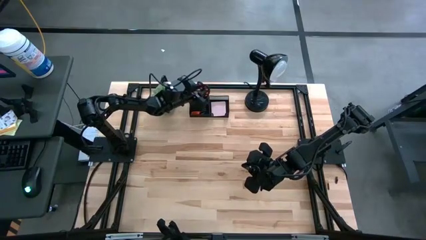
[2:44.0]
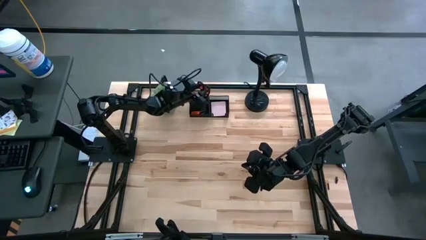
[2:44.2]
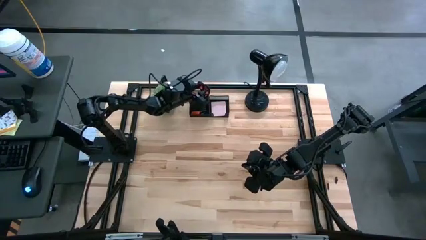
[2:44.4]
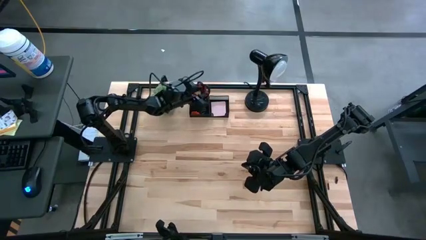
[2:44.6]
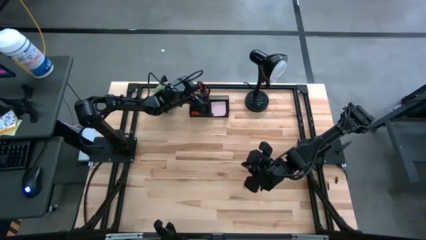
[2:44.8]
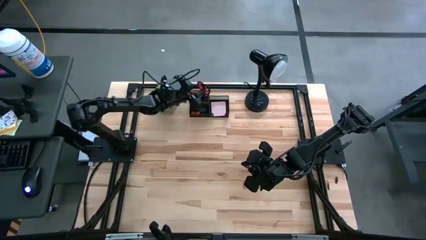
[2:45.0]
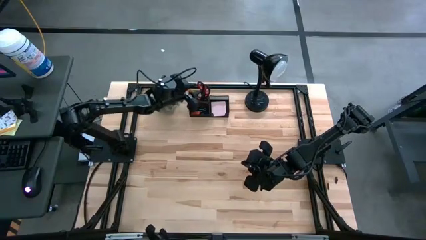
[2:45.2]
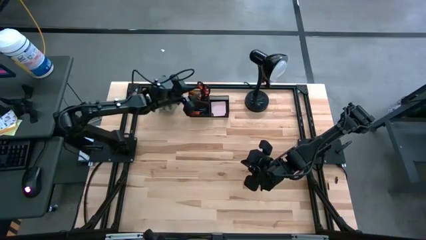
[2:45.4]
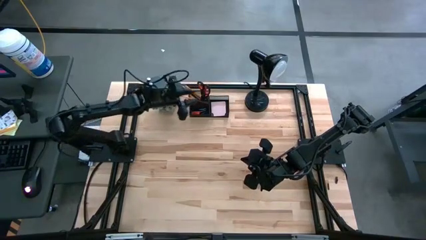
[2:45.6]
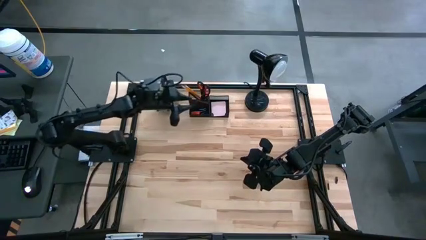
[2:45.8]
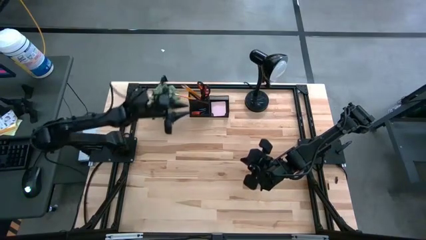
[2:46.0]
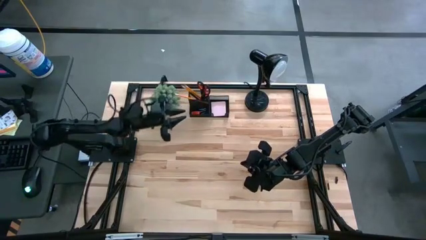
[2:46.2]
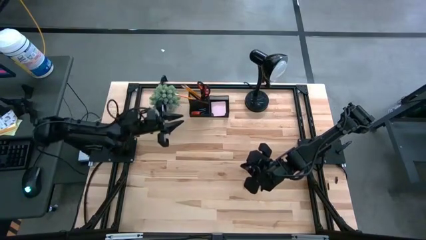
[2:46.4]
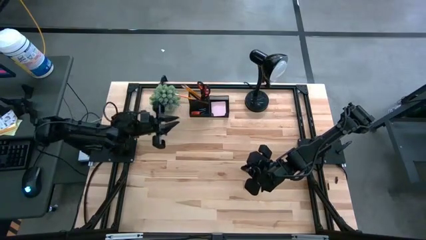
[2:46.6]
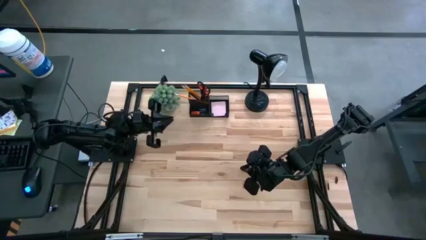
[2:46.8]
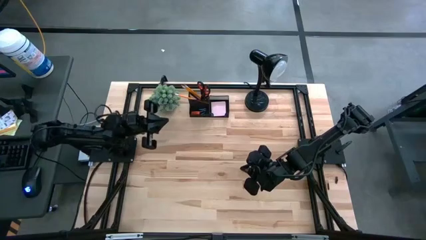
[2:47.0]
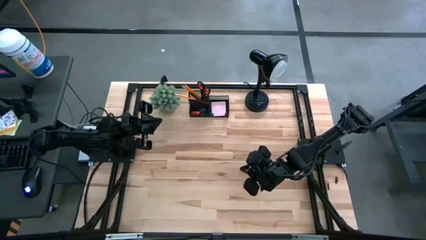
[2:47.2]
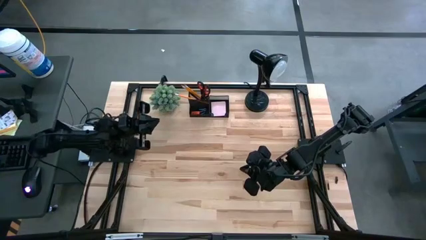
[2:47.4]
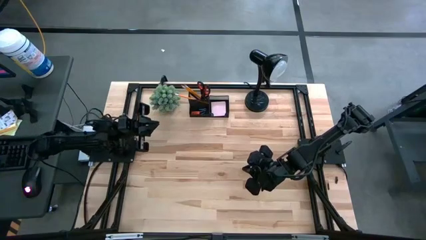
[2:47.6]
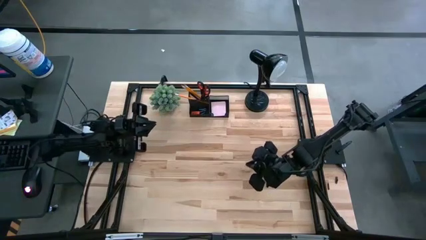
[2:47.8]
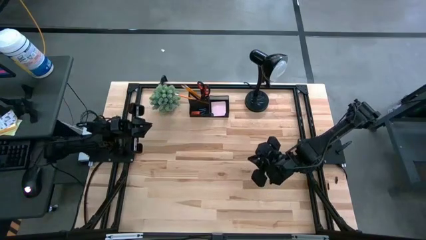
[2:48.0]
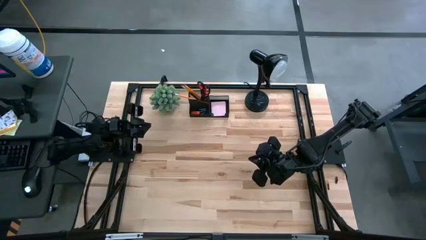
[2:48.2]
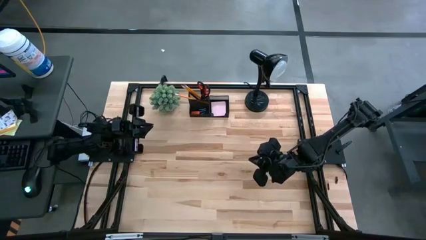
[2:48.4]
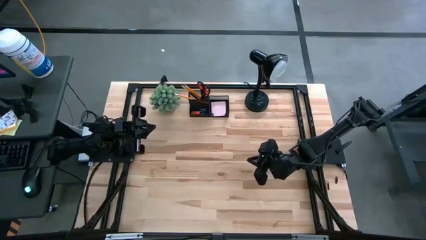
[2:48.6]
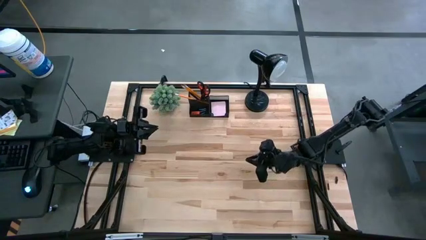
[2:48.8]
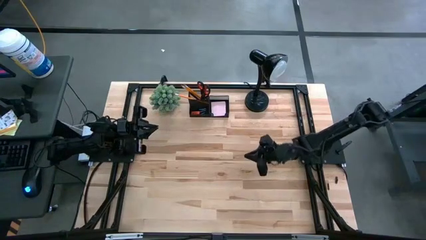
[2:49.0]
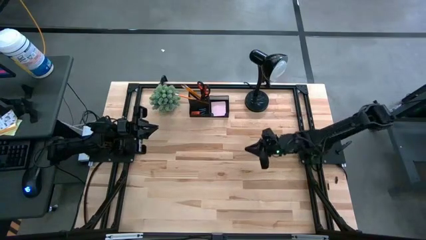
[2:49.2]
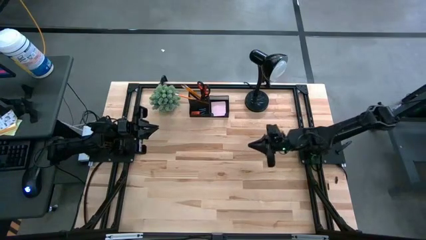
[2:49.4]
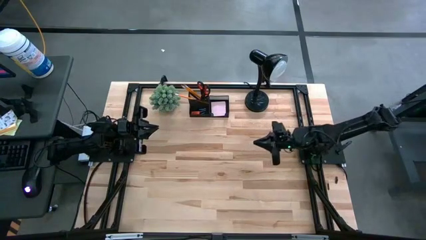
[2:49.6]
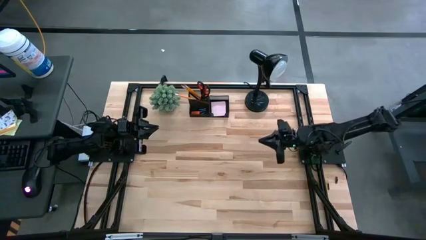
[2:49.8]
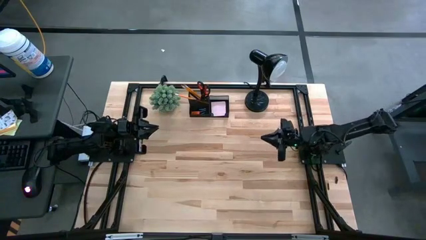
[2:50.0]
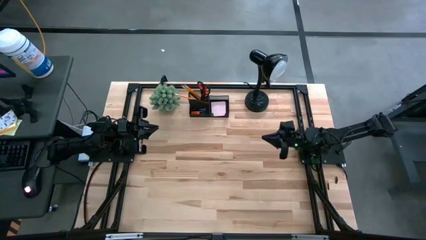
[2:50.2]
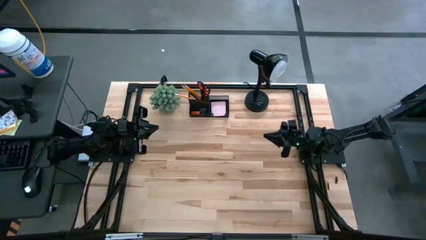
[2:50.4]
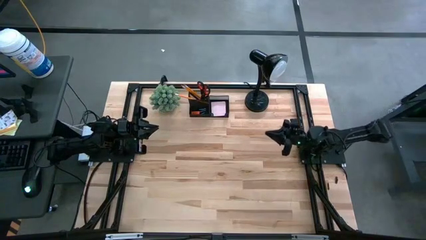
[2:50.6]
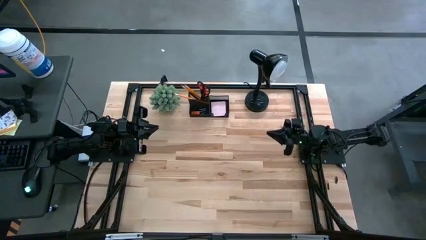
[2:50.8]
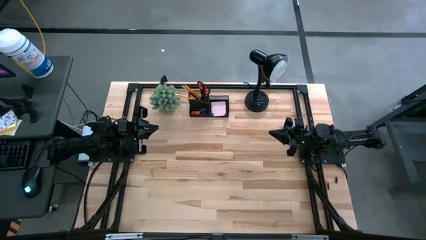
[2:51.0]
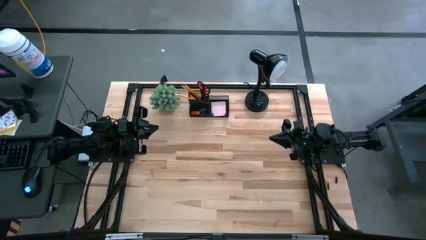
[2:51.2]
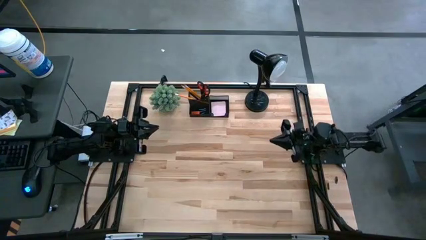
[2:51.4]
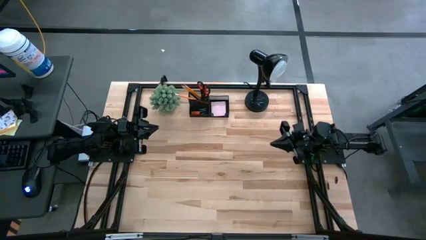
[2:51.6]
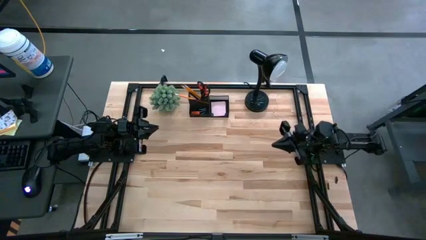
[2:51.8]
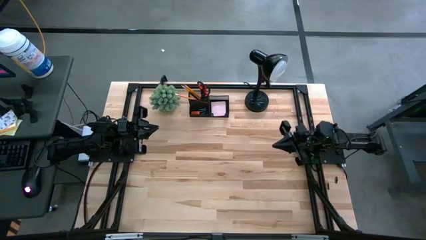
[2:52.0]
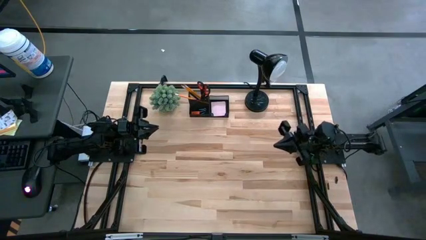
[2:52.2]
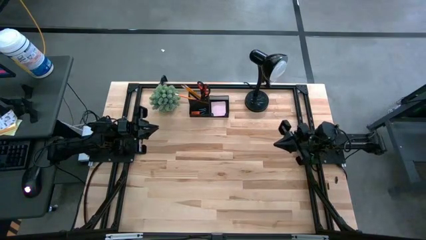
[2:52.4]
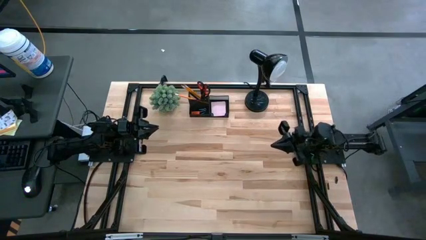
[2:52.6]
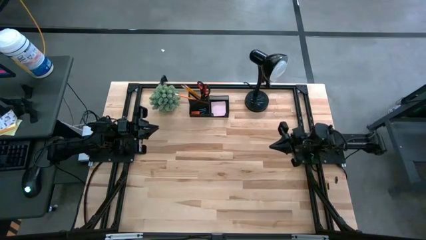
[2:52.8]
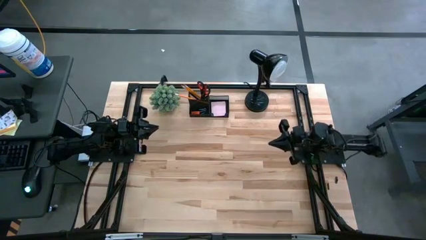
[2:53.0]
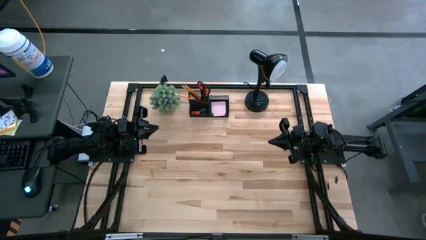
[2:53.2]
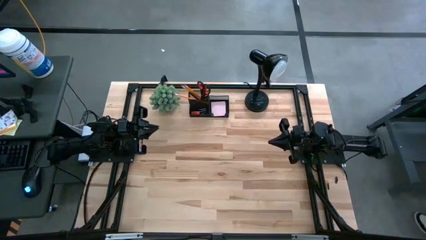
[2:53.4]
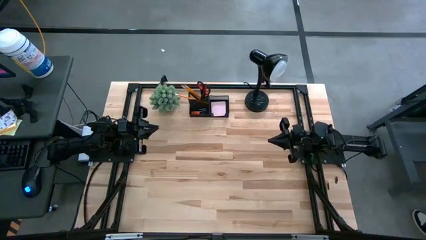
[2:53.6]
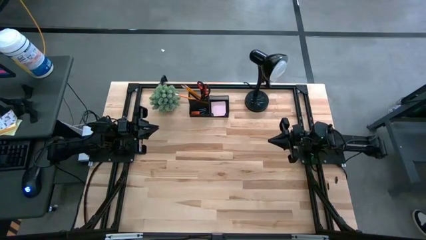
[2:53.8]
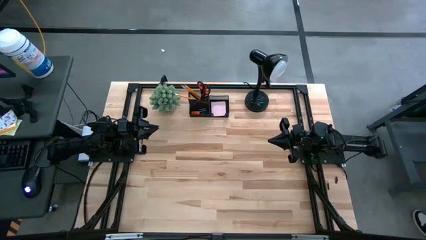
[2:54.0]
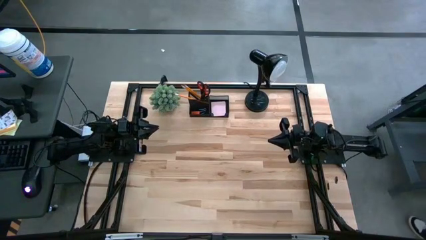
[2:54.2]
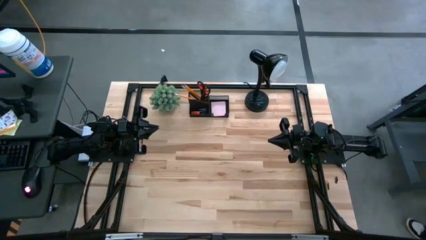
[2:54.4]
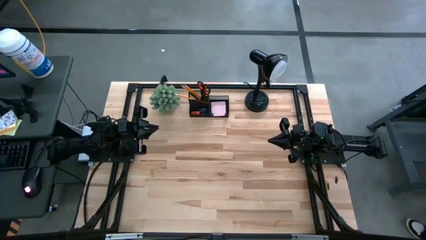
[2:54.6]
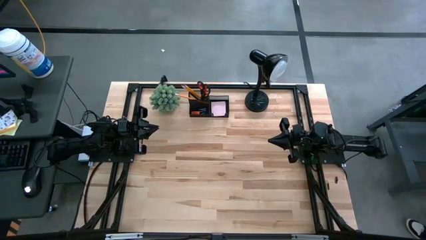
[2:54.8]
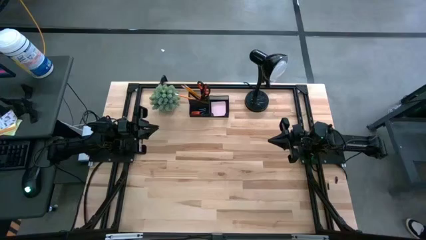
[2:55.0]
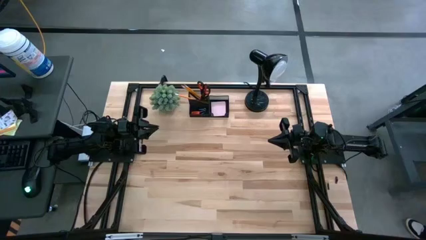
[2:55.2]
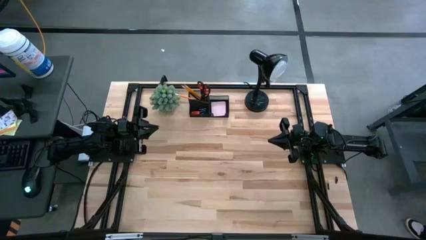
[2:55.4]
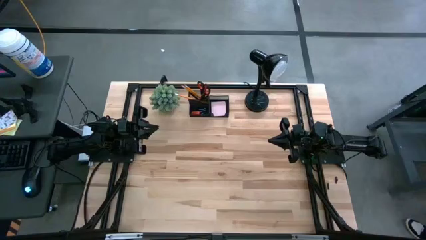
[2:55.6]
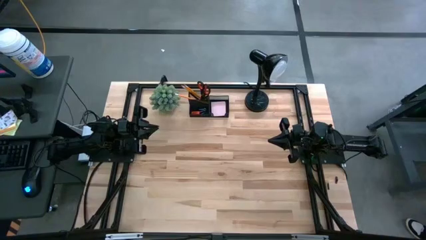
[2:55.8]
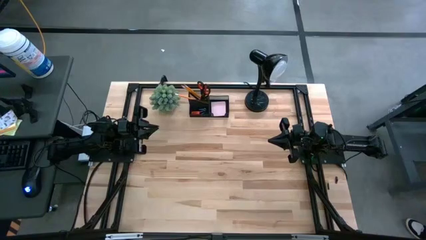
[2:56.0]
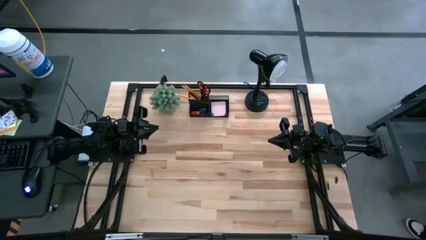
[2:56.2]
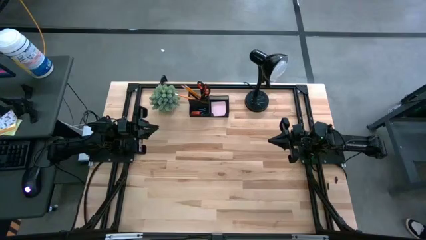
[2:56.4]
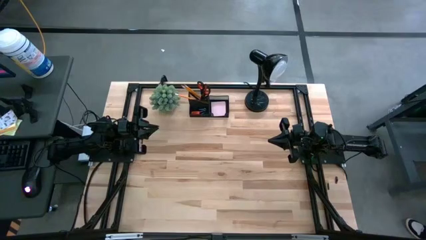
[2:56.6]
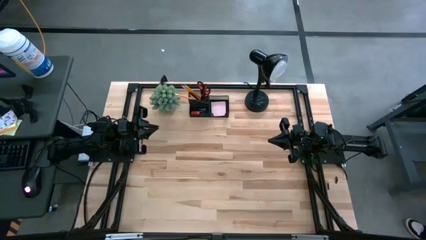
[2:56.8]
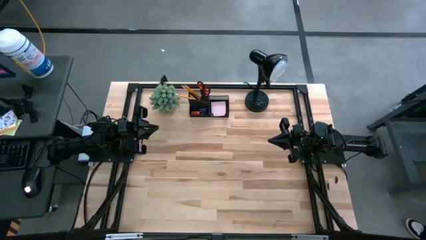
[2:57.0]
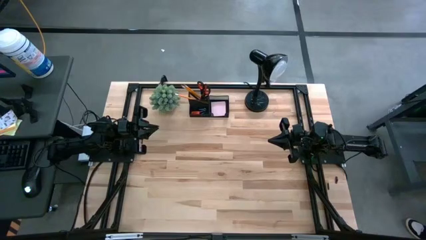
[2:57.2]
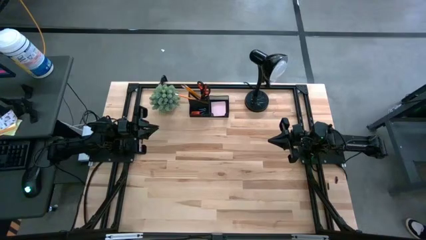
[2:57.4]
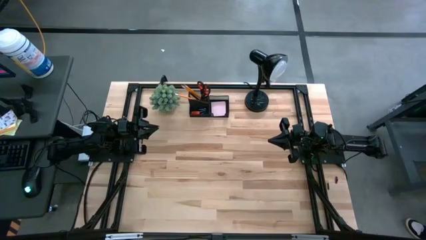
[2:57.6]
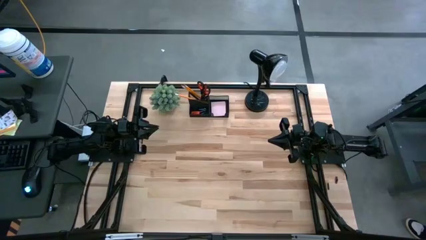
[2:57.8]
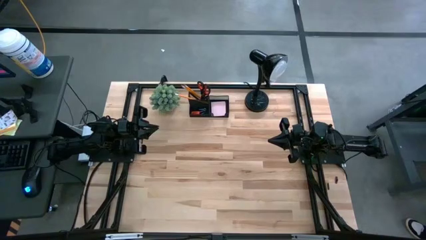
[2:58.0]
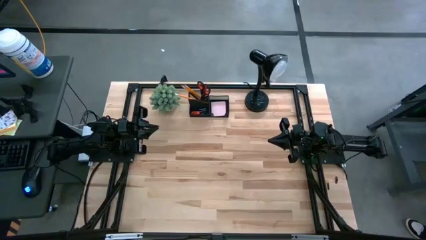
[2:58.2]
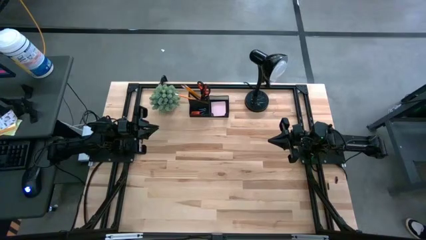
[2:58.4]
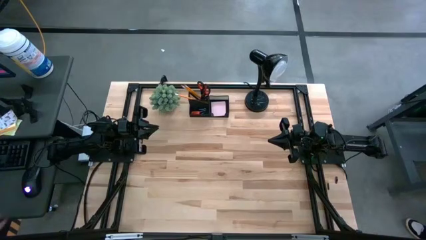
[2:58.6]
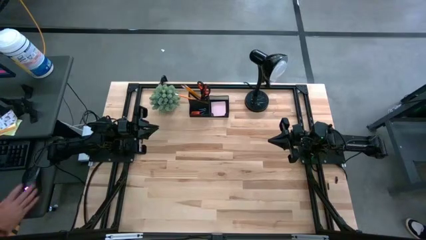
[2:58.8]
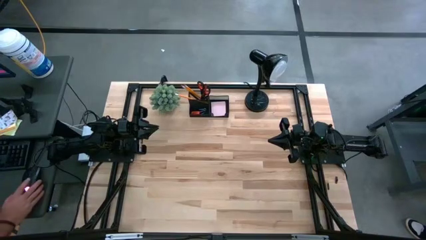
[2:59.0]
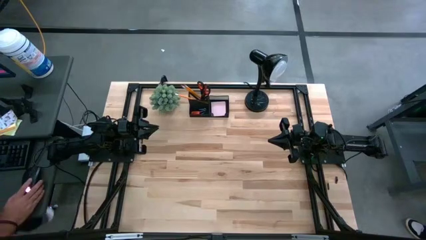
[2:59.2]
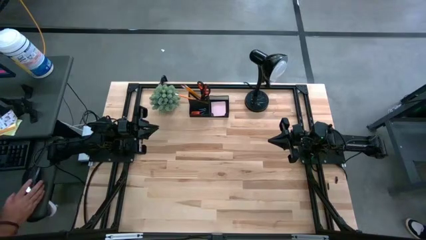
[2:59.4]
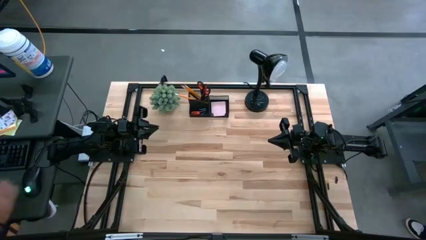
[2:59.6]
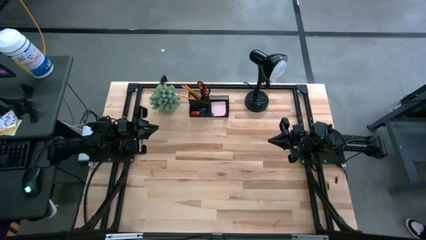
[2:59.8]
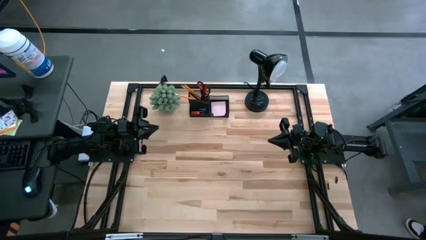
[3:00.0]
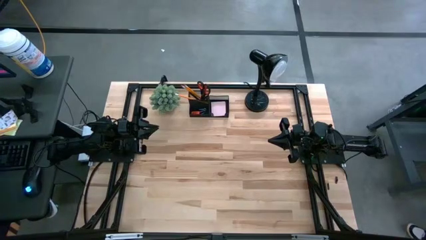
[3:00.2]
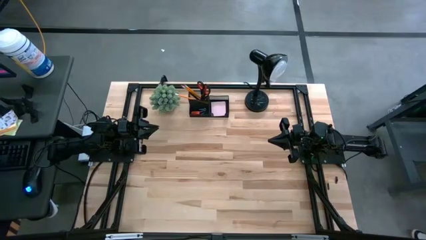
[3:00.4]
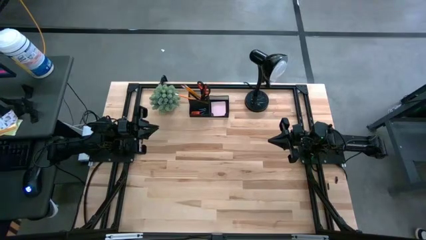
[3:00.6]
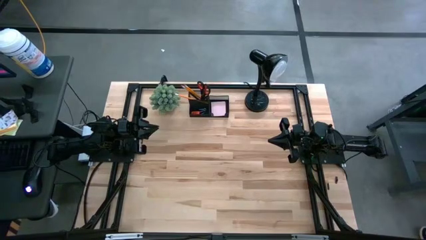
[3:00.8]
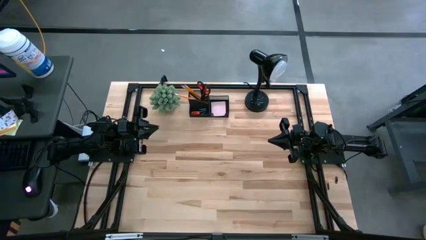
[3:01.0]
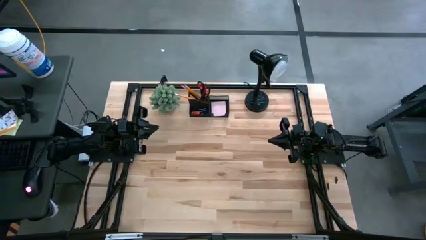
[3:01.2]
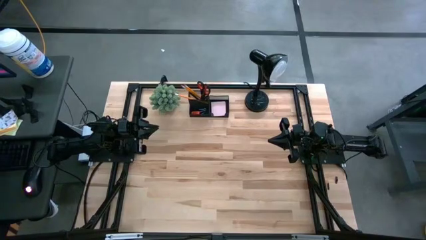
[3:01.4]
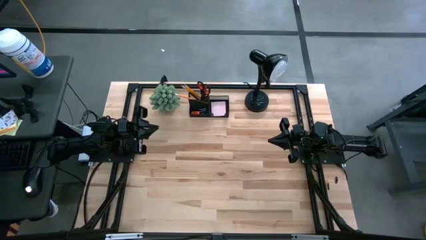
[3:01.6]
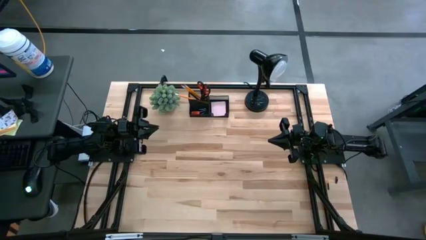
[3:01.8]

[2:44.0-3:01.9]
Task: Pick and place office supplies into organizer
Return to Home Position
